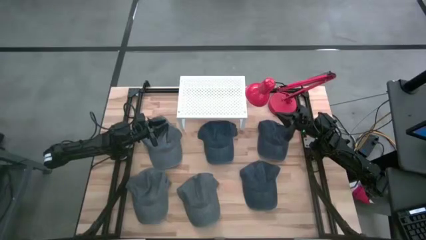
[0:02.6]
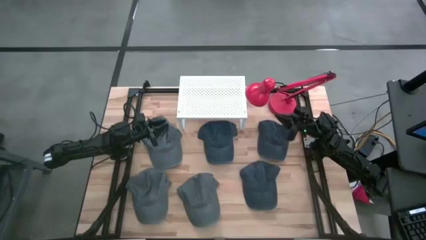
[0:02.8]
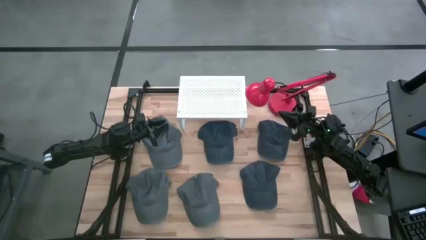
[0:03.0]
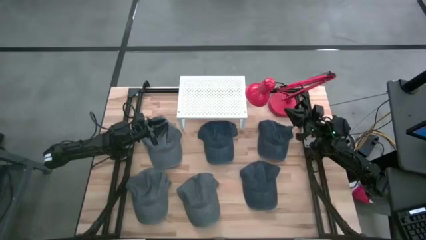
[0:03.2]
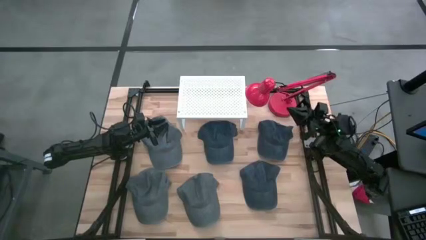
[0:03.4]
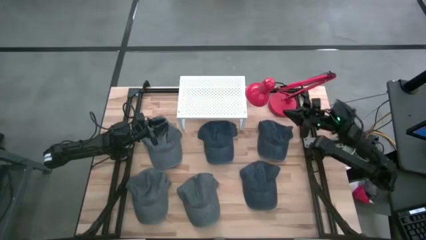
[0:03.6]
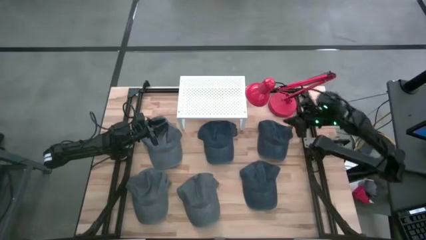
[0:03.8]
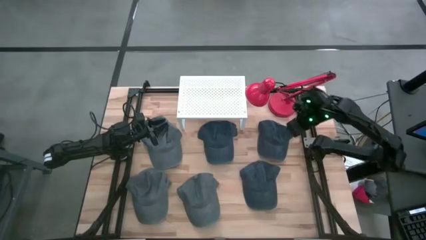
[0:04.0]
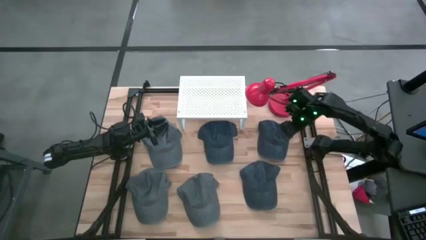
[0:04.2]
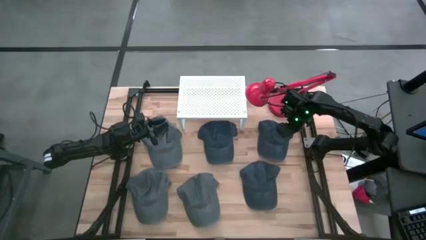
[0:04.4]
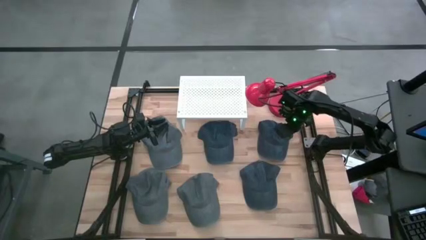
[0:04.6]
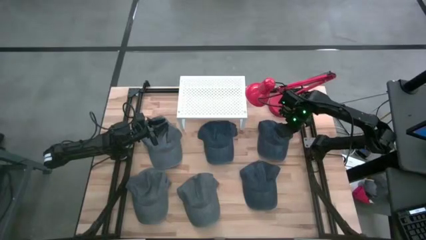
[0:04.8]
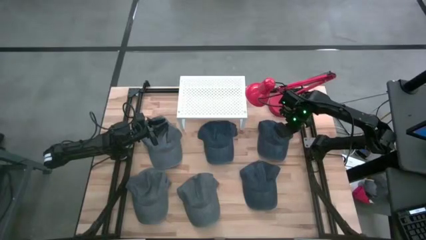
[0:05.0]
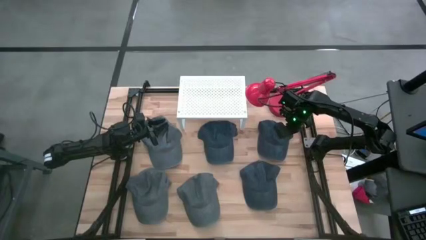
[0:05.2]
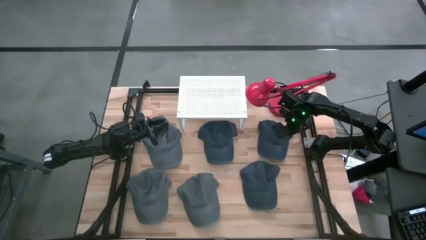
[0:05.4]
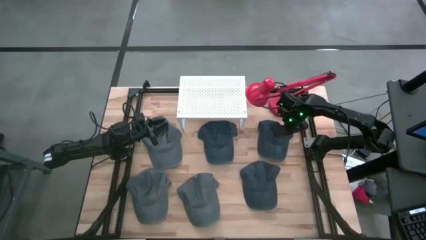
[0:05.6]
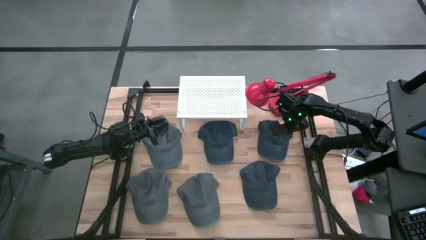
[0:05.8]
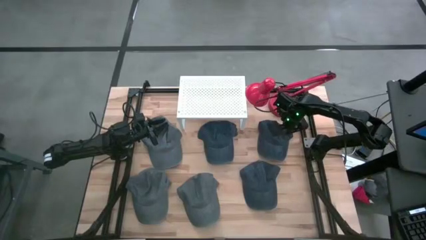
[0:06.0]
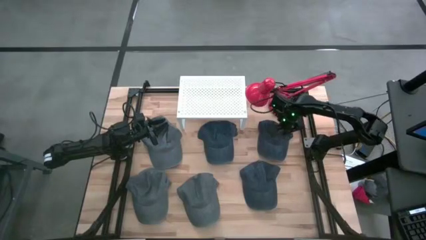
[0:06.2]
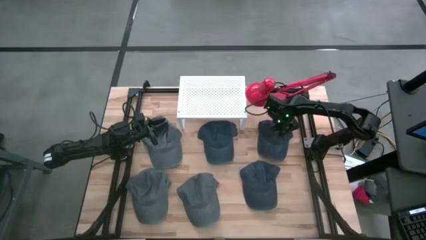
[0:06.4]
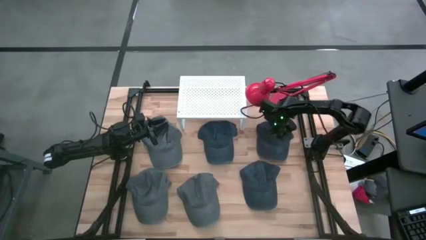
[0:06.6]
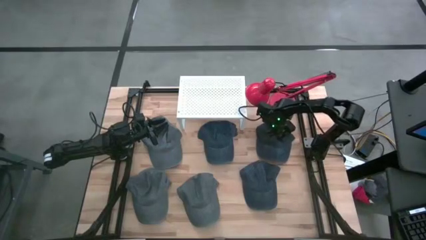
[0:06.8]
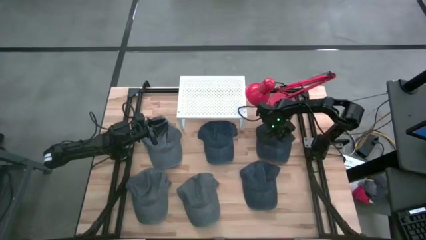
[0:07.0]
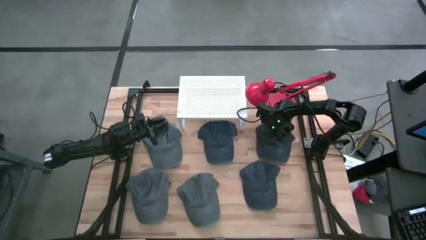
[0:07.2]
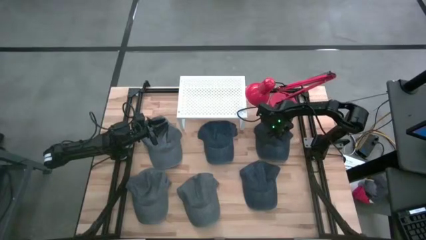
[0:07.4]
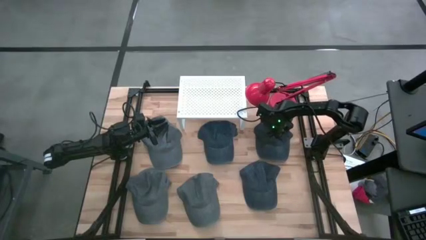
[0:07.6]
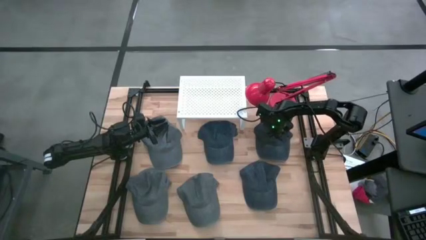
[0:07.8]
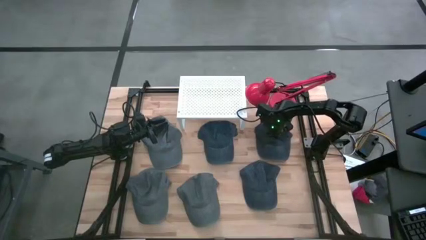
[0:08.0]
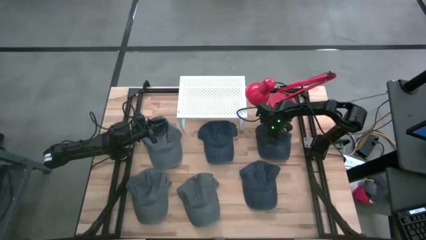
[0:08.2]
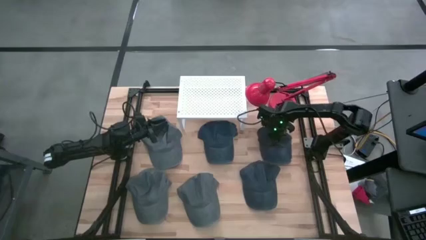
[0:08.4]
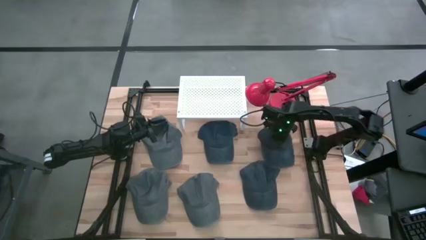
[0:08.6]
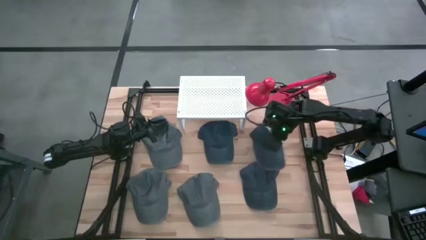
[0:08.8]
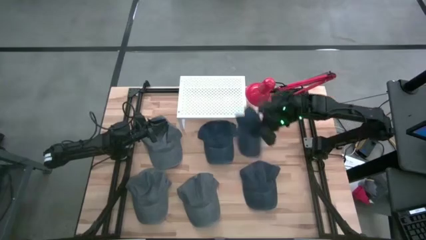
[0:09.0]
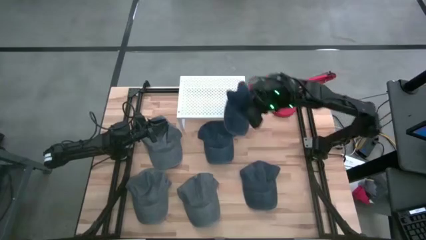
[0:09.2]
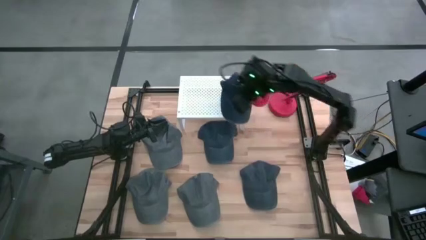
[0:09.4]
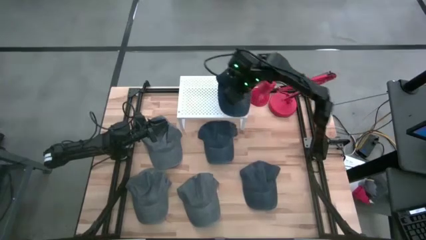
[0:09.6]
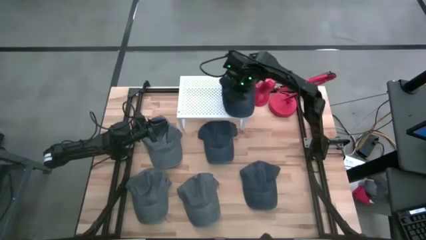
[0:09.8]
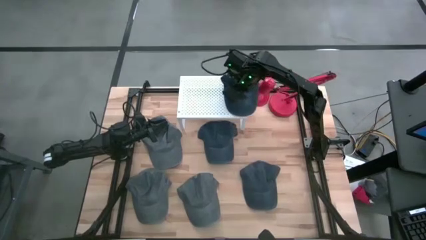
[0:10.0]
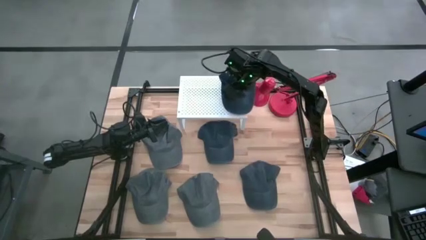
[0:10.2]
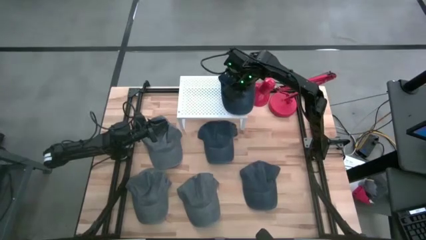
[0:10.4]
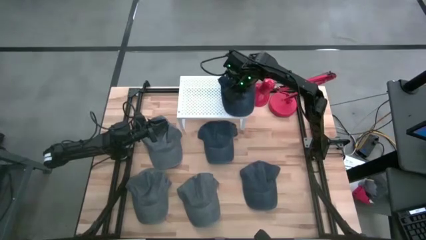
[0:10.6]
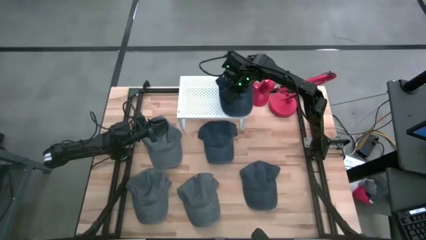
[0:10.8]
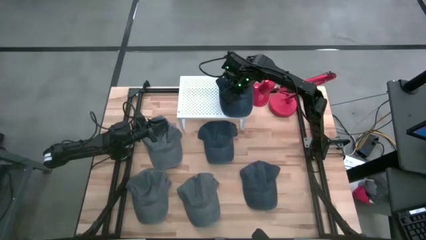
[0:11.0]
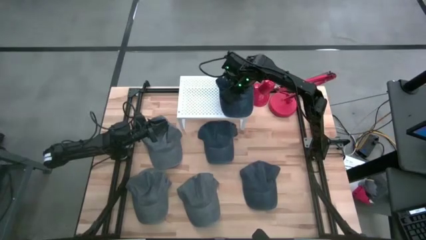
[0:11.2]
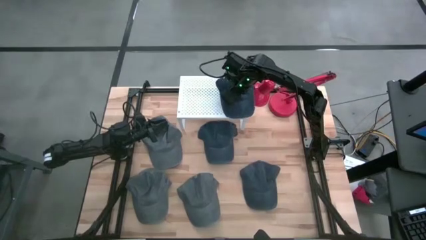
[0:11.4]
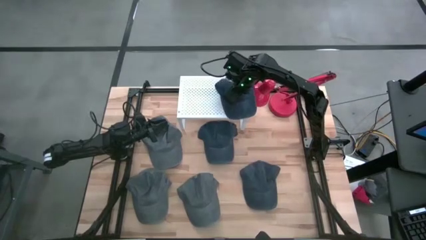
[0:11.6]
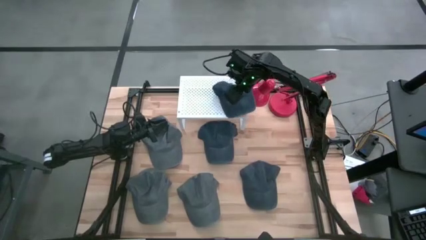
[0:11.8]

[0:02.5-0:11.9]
Task: Pick & Place hat
Put the top right dark blue cap on the shelf

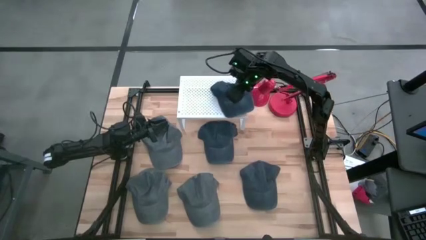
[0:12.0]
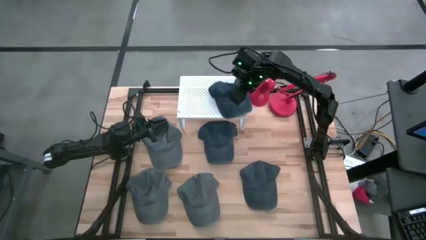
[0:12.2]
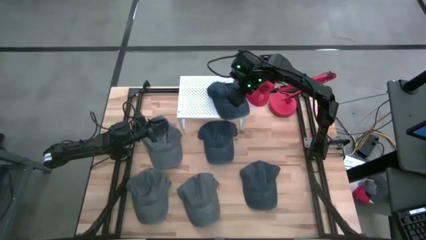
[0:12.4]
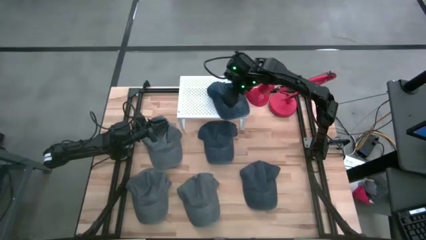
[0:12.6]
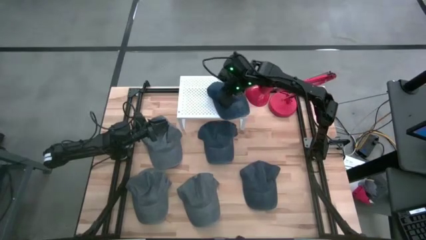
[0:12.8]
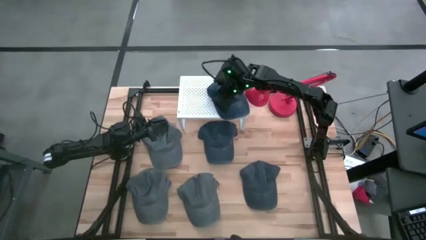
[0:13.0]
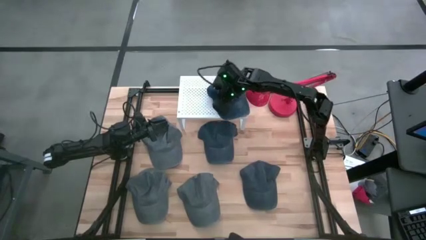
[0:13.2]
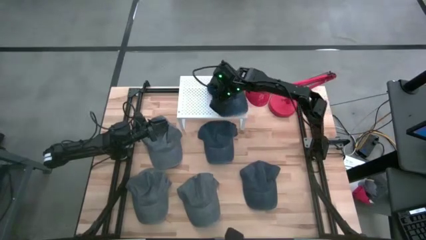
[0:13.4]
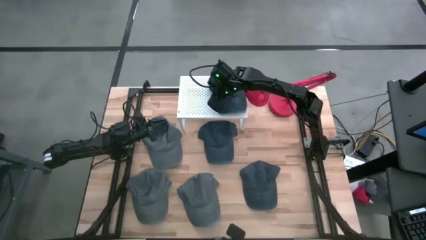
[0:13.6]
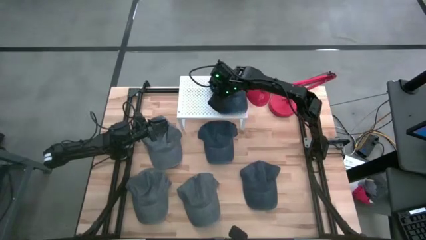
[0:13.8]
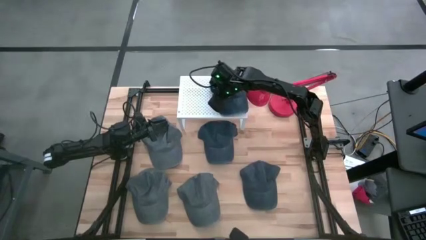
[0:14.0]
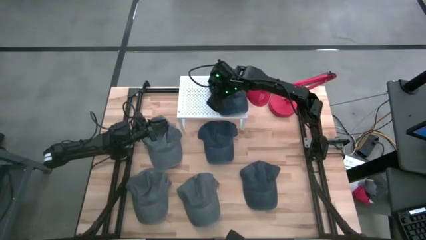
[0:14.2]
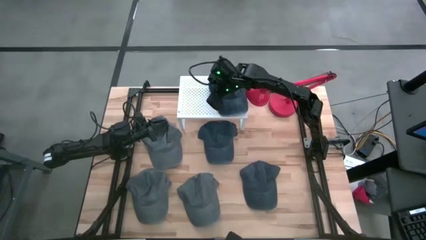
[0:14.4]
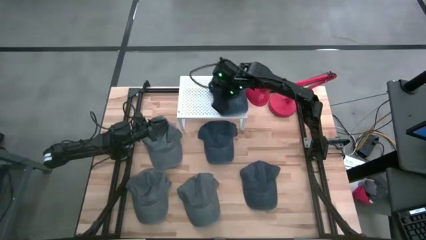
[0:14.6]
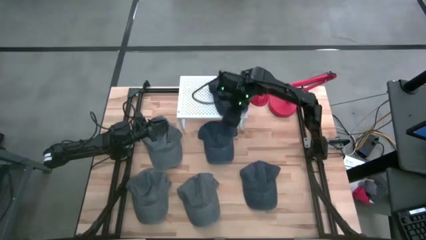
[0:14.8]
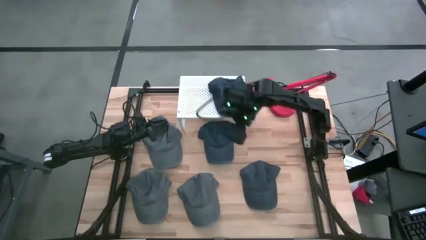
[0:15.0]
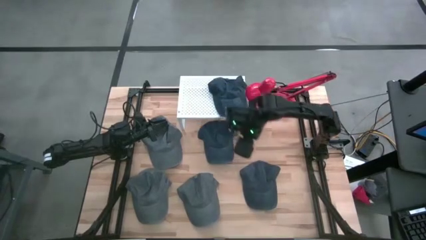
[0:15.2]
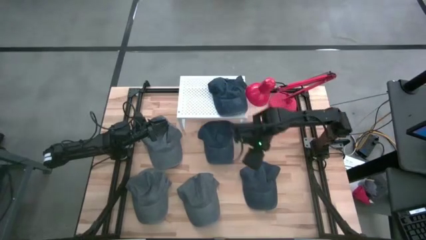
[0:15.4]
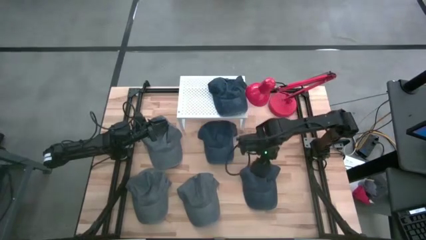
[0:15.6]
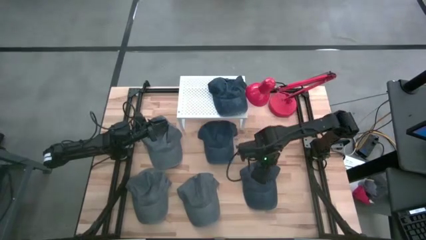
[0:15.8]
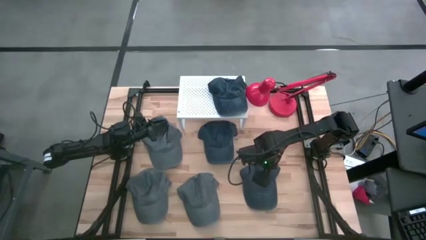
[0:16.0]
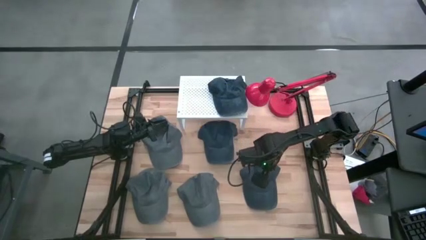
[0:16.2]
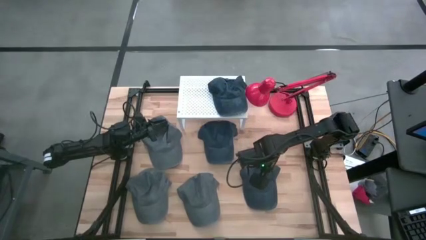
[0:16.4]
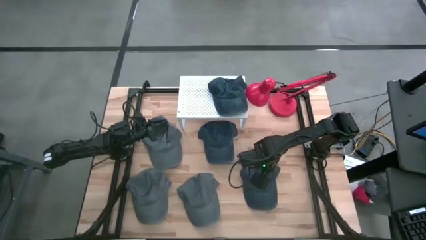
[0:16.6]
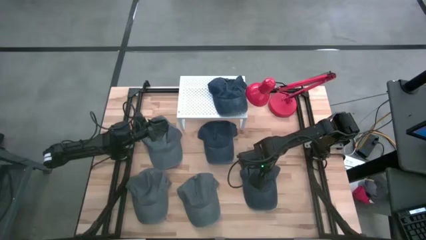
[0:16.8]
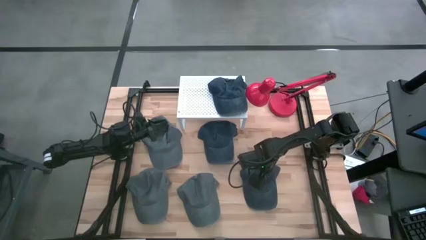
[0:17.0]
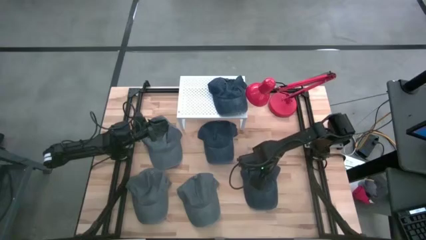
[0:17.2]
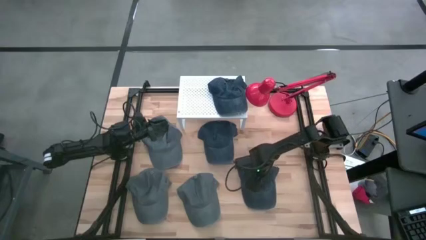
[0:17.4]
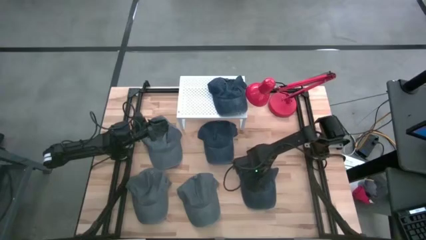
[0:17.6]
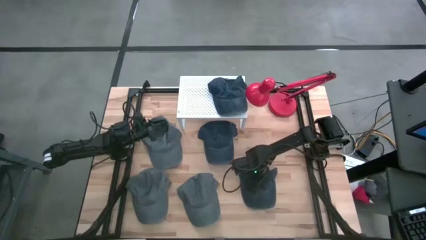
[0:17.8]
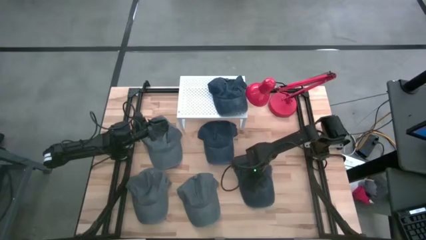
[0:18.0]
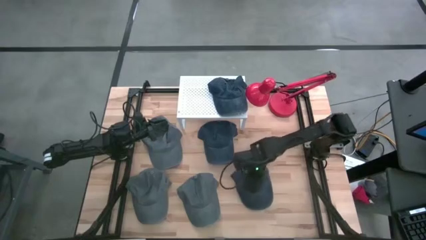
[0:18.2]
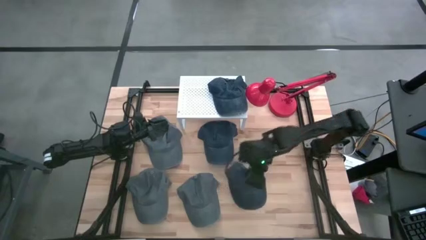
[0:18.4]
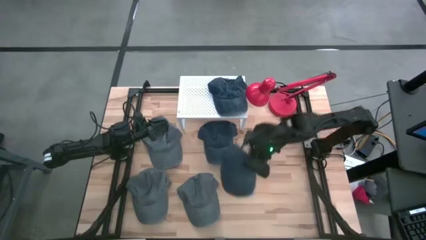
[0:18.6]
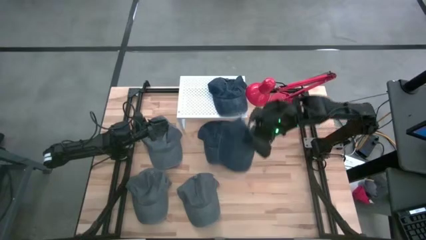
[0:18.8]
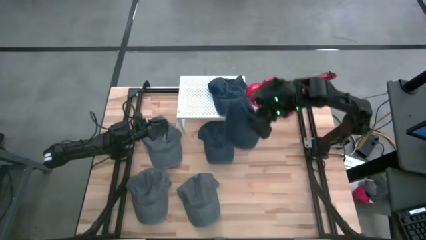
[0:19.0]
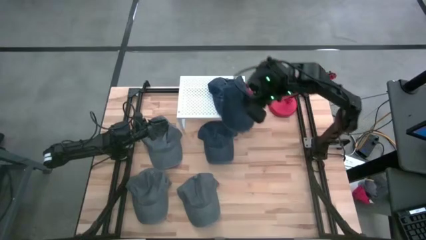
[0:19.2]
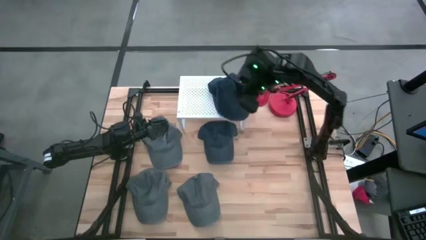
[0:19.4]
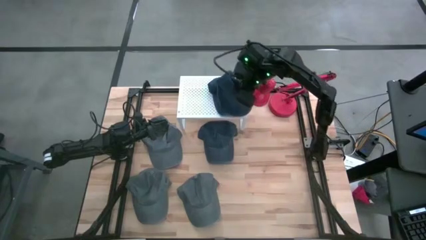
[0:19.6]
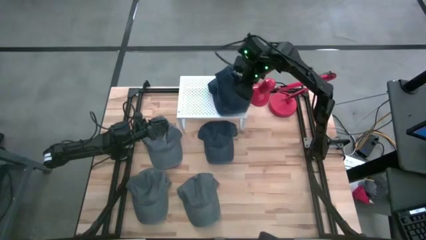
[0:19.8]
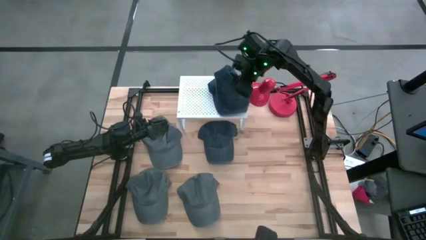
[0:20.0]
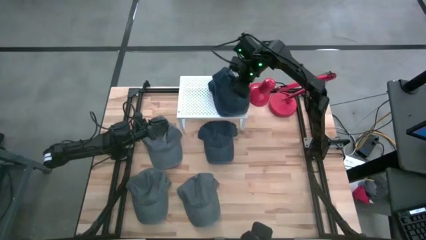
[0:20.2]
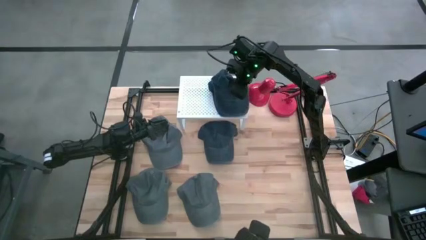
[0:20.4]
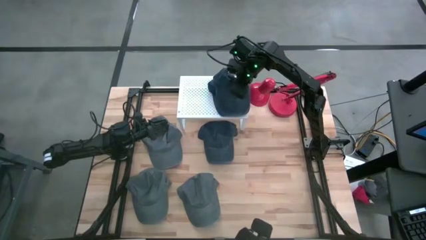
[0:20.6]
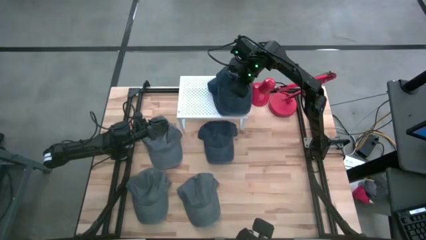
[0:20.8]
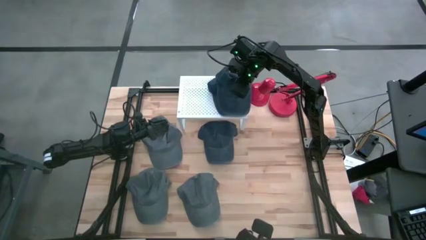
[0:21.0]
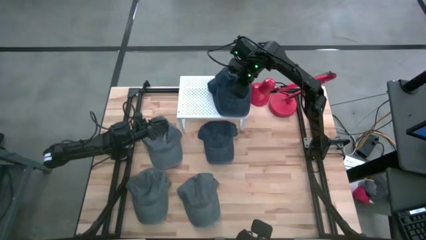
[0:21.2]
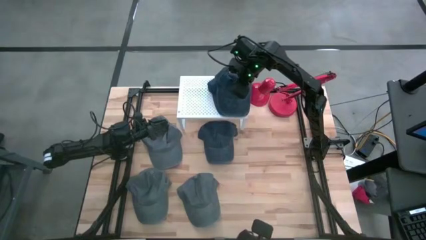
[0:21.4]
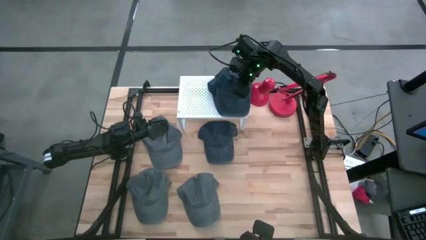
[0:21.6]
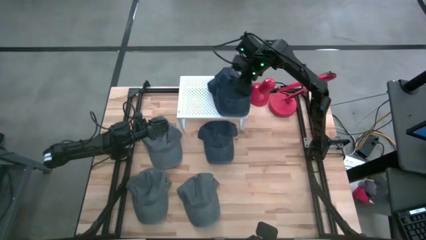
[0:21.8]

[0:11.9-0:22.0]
Put the bottom dark blue cap on top of the other dark blue cap on the shelf
